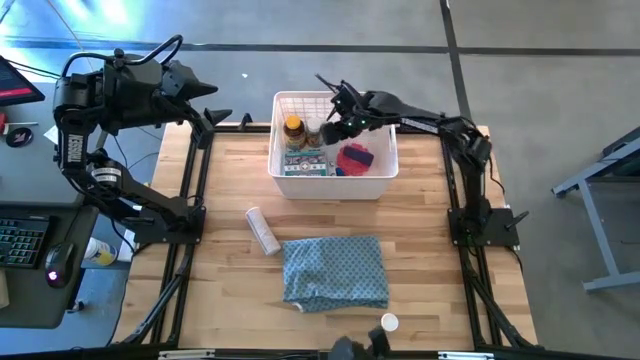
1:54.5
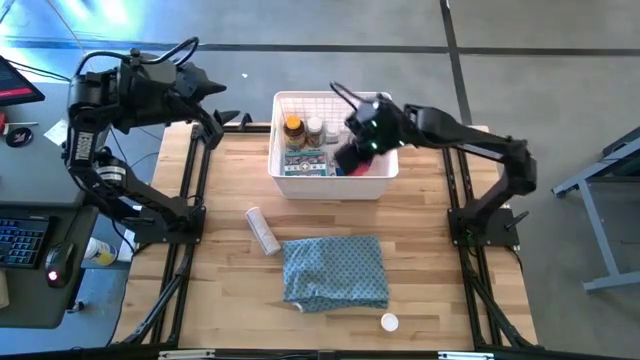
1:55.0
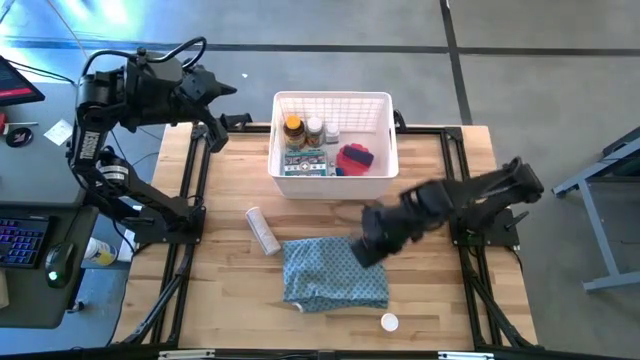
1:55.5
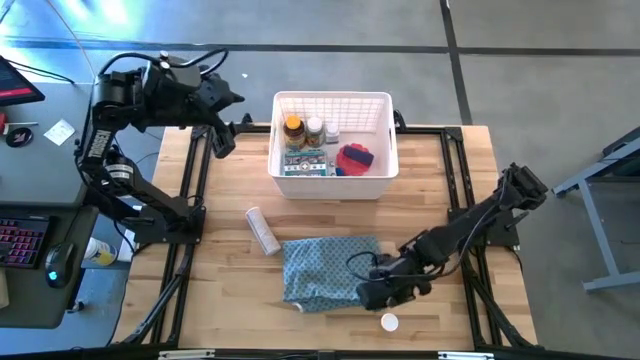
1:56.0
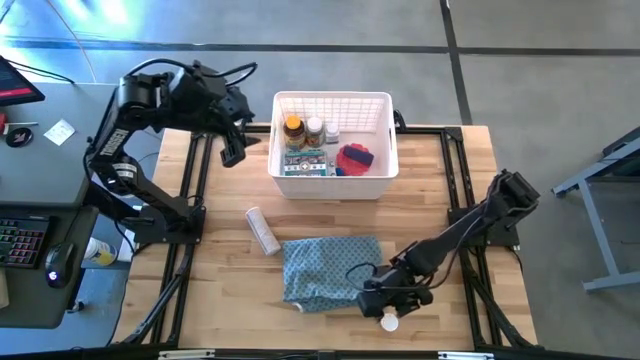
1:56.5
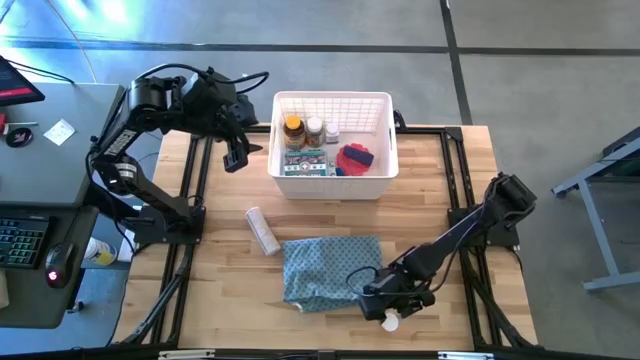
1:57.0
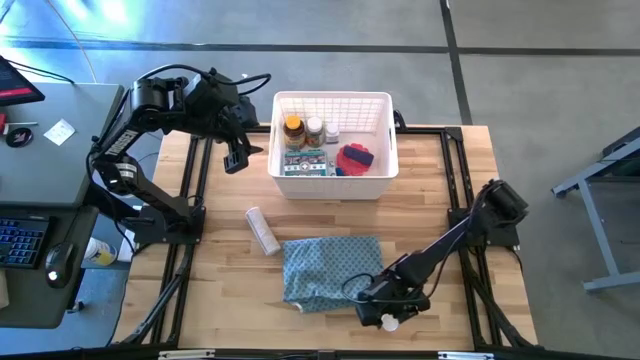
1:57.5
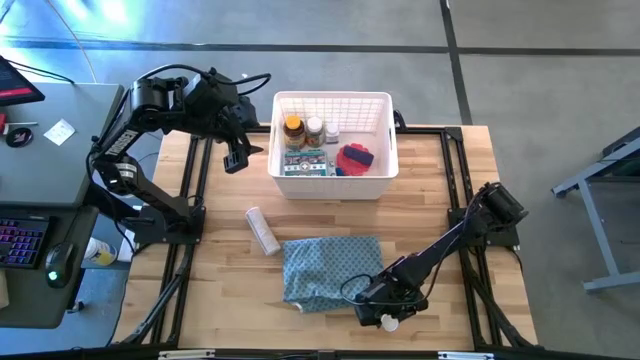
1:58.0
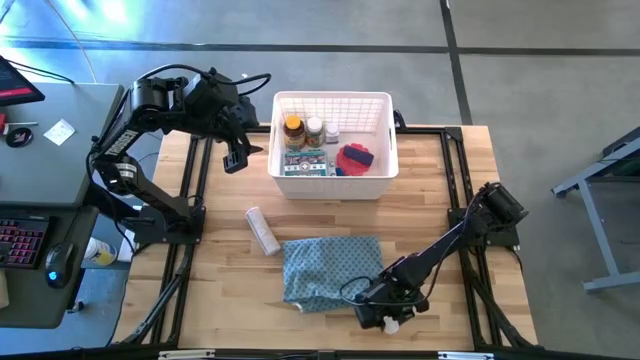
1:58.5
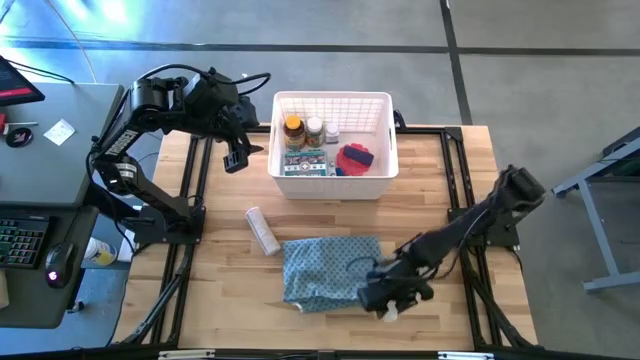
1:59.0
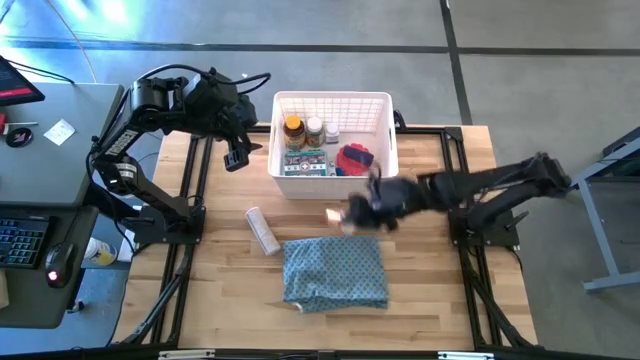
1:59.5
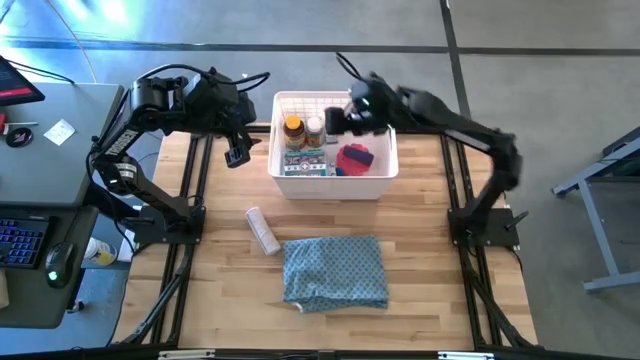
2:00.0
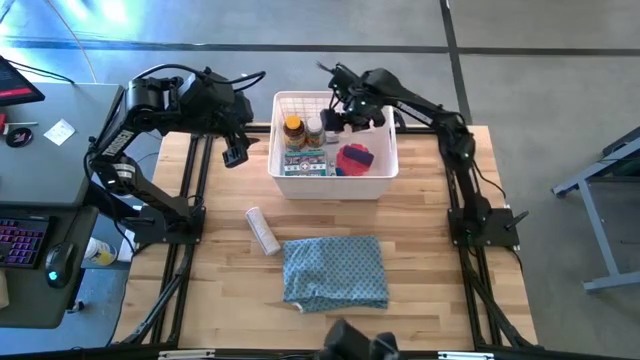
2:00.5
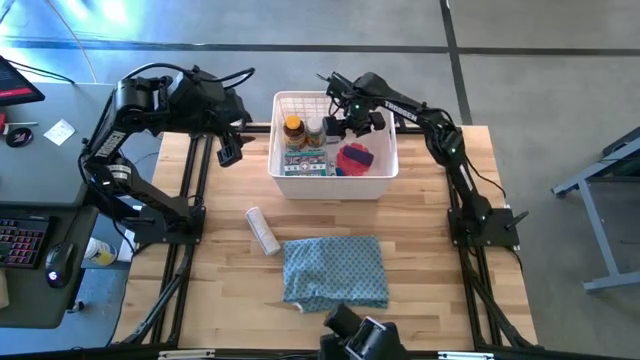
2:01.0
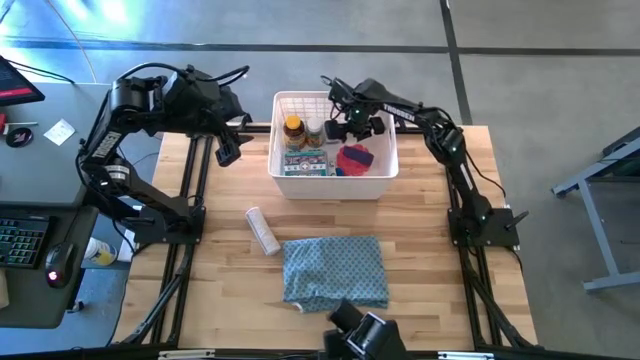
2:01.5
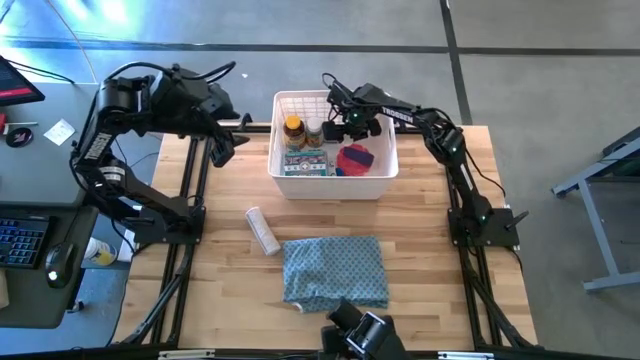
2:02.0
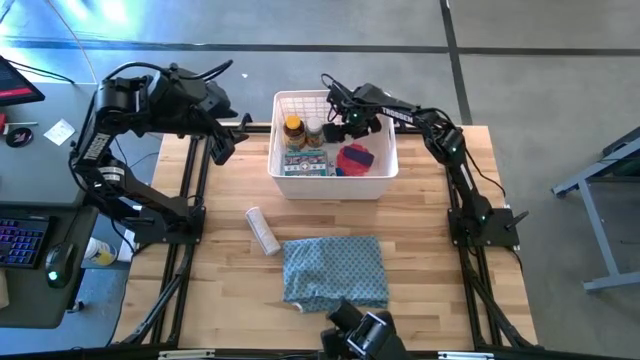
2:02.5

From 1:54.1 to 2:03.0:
Task: Pick & place medical supplies in basket/bin
Put the orange pill bottle into the white bin

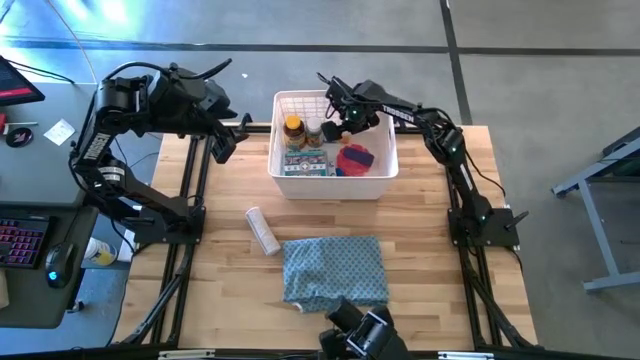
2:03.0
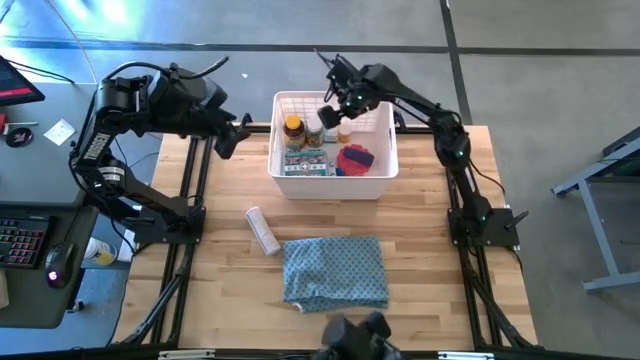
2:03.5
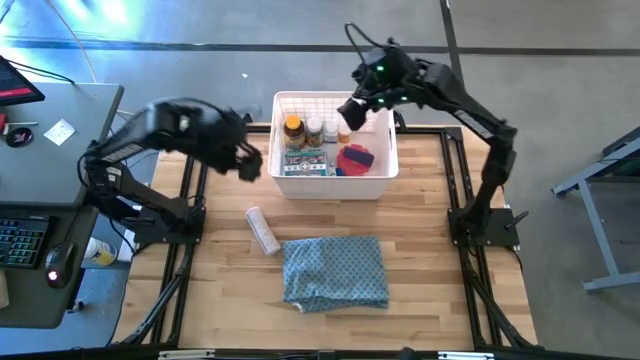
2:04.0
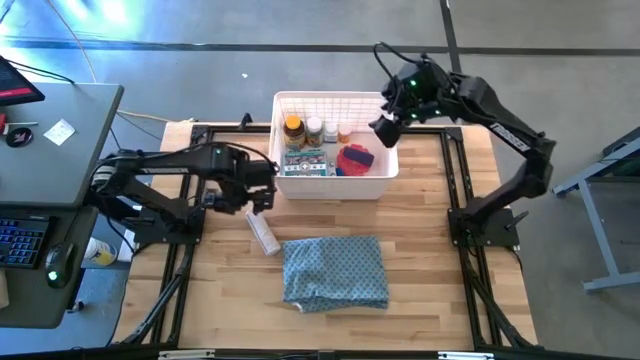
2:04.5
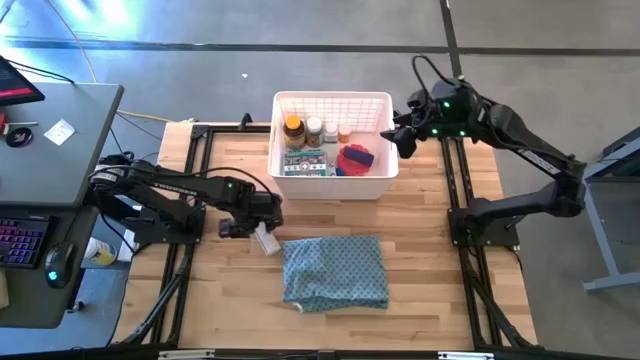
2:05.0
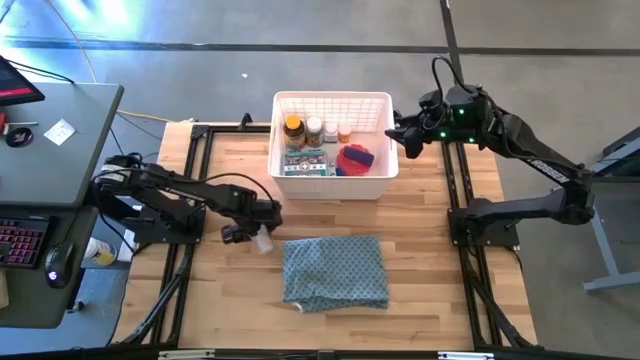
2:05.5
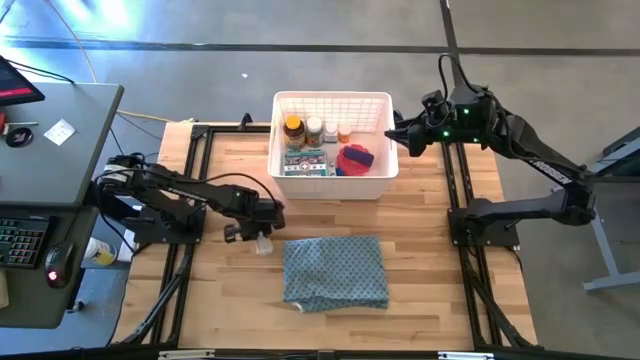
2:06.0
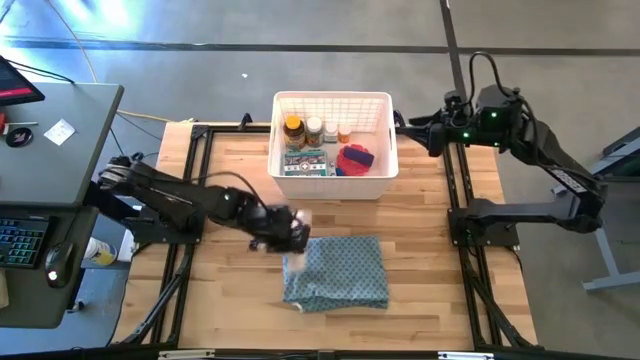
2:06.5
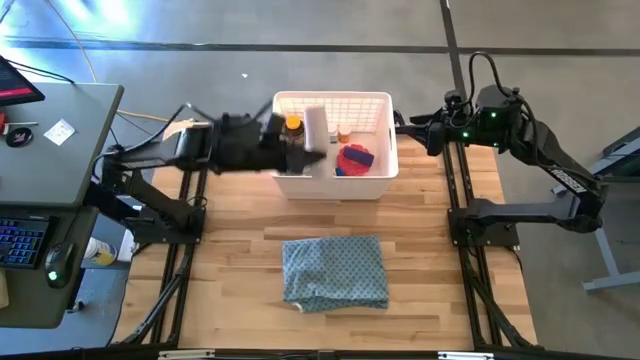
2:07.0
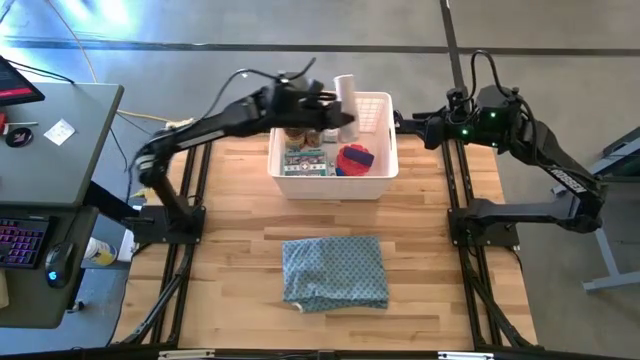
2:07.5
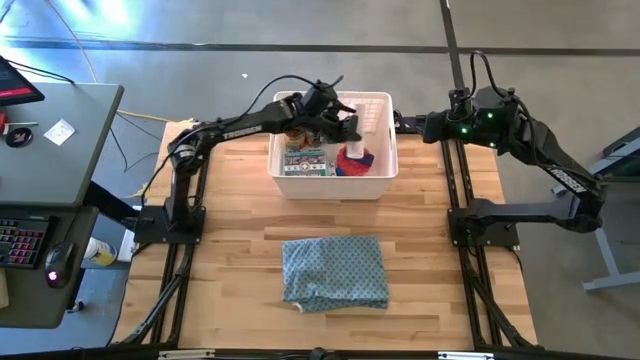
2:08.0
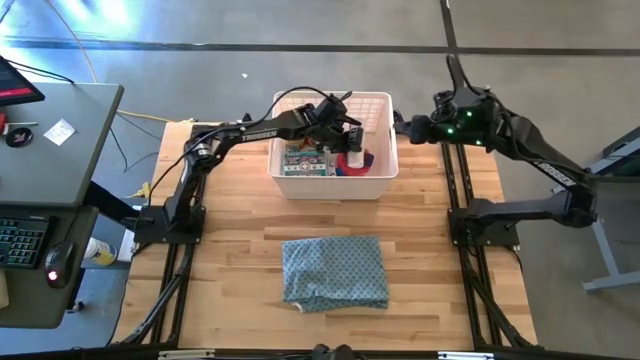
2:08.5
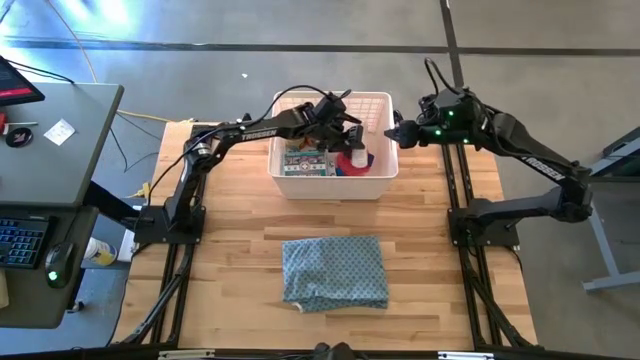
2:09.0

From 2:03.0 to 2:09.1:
Put the white bandage into the white bin

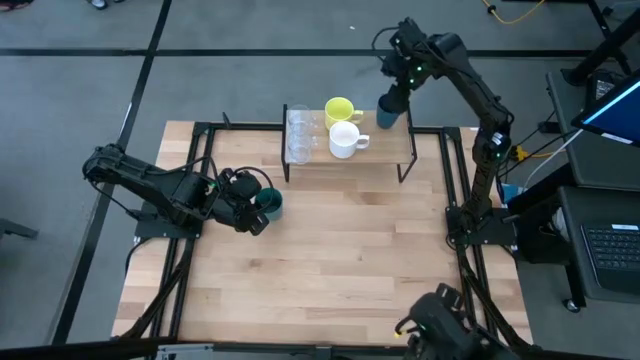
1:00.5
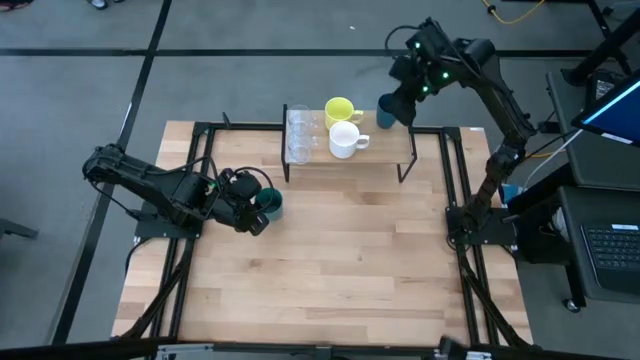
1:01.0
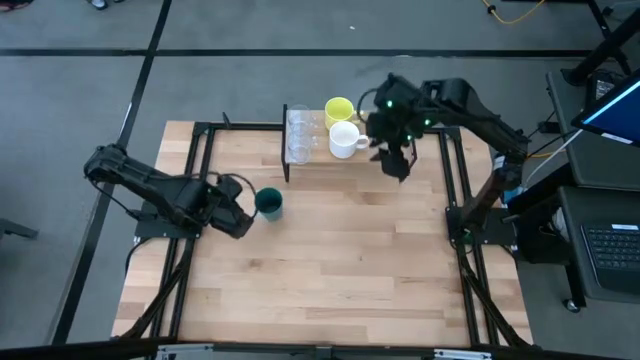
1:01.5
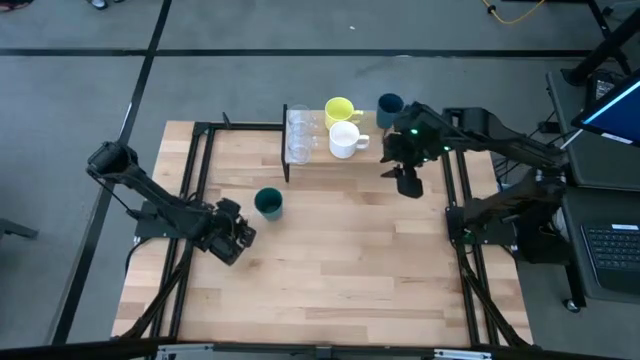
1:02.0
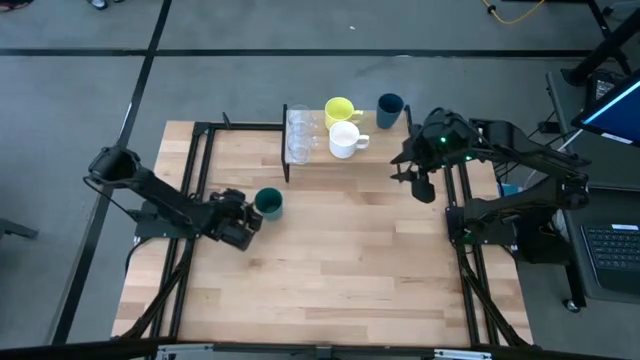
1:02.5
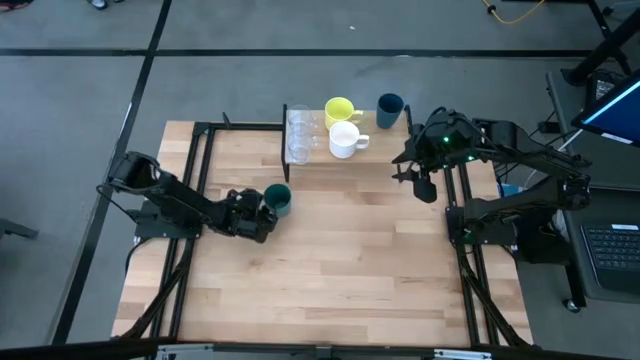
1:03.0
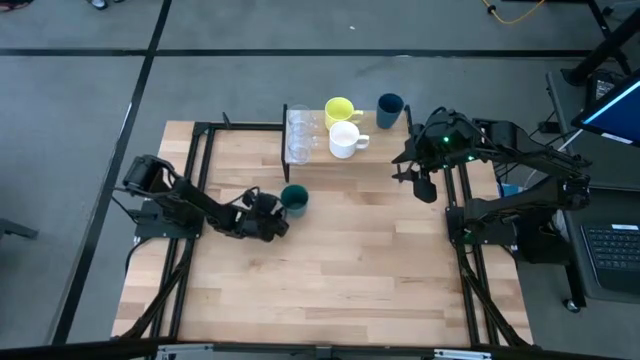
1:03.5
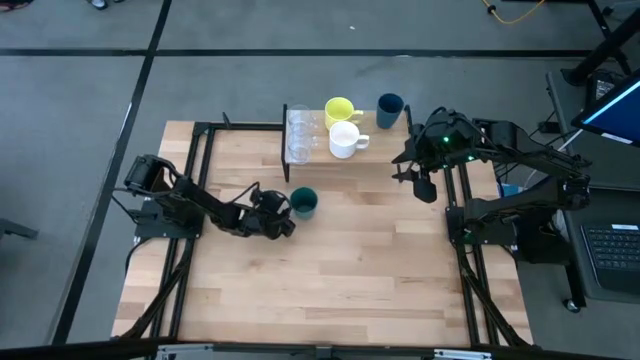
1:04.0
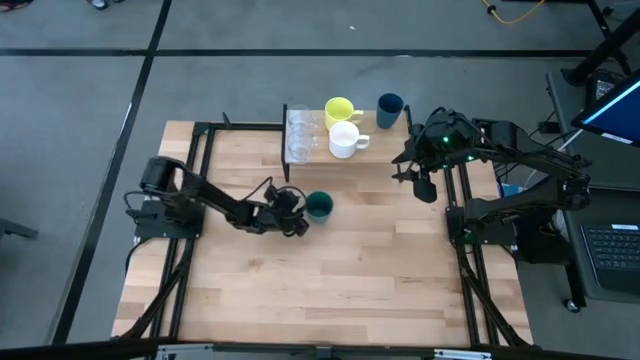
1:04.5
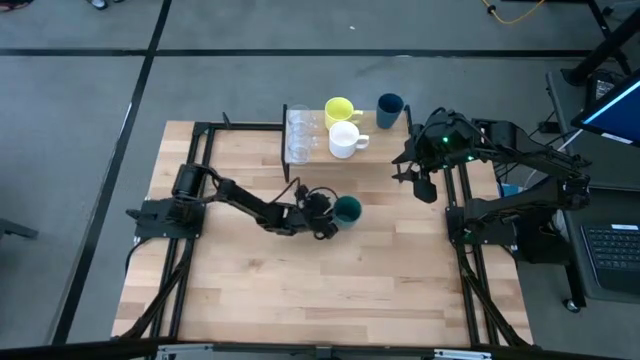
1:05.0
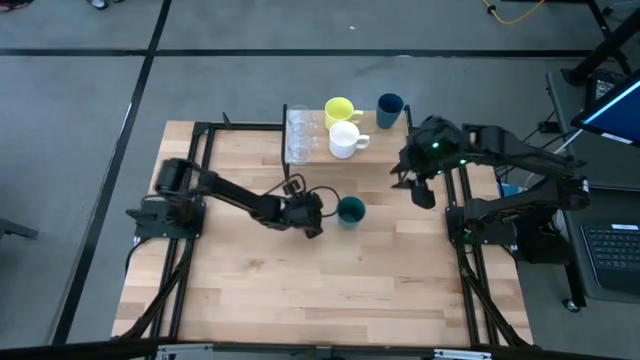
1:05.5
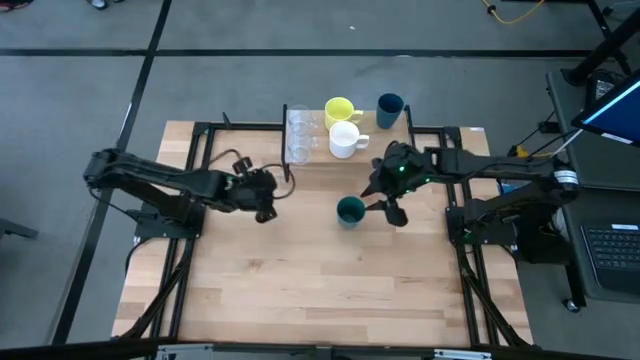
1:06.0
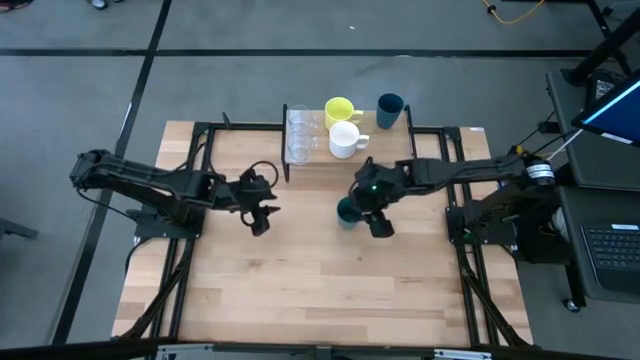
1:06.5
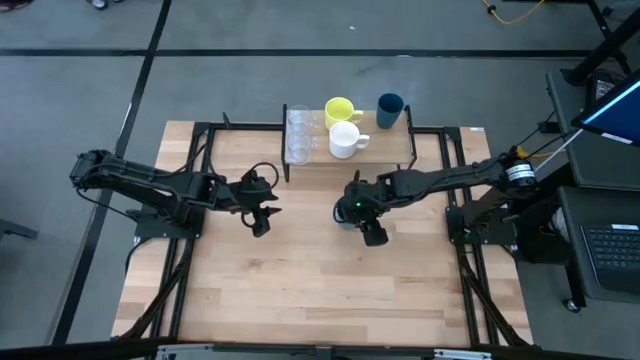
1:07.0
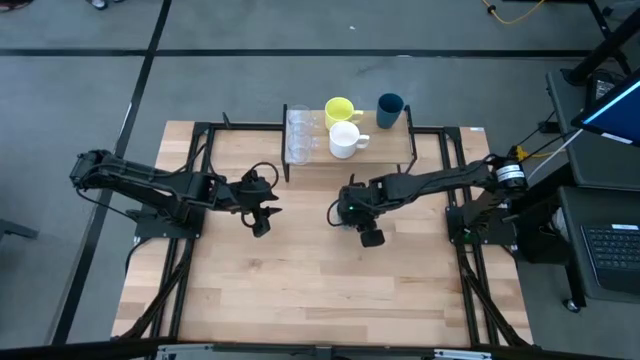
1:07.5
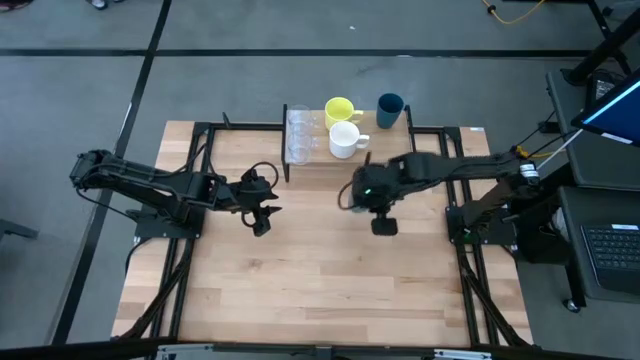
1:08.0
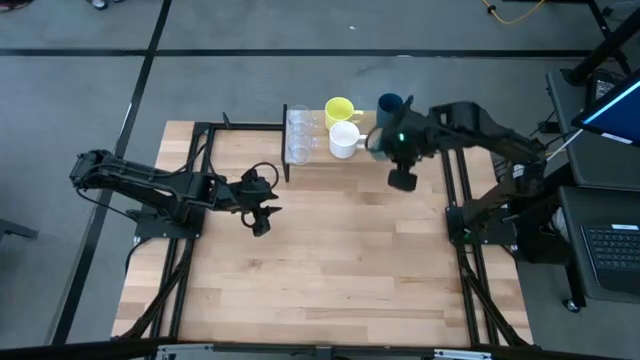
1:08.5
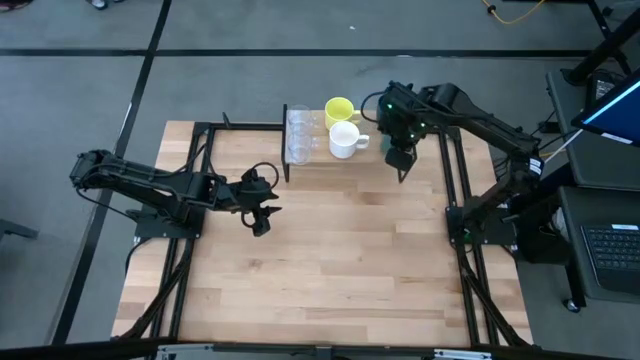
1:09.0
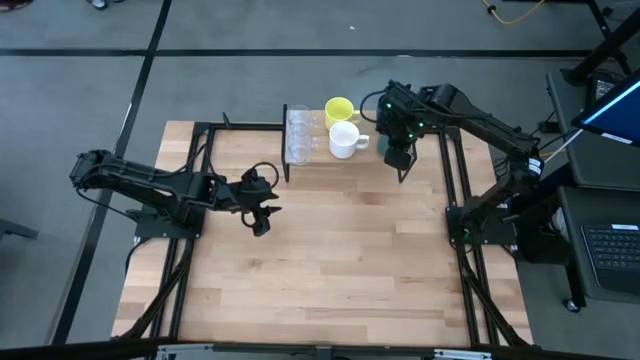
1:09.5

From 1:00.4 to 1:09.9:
Task: Stack small to large cups/mugs on shelf
Put the green cup on the shelf, aligned with the dark blue cup
